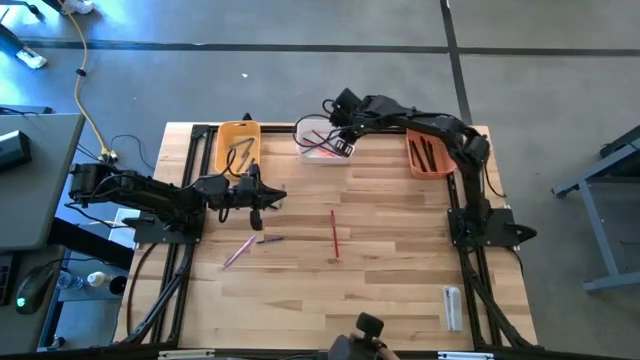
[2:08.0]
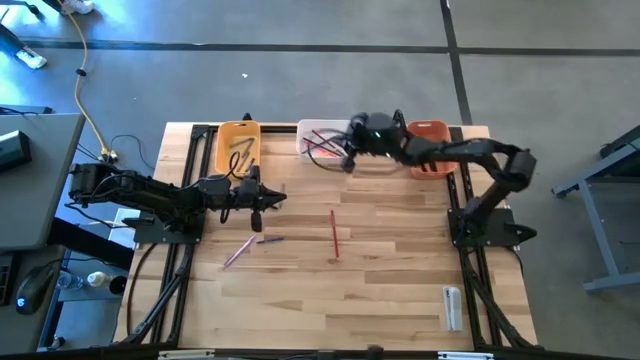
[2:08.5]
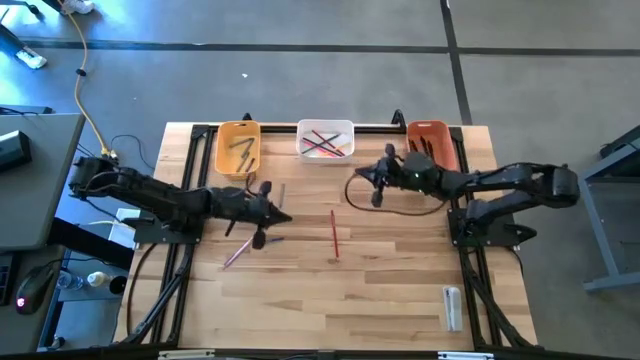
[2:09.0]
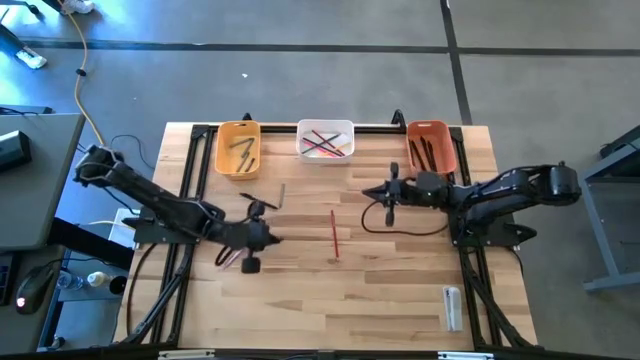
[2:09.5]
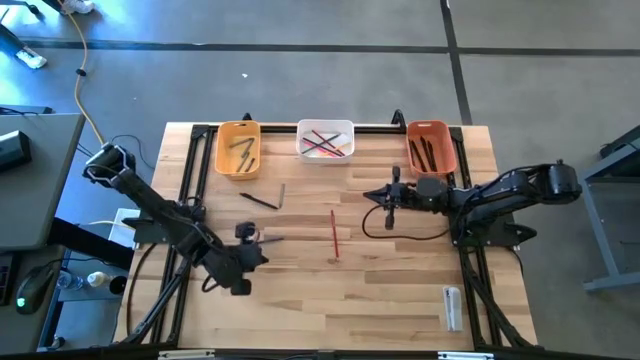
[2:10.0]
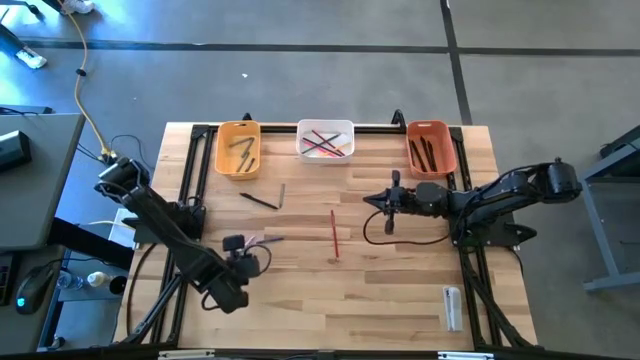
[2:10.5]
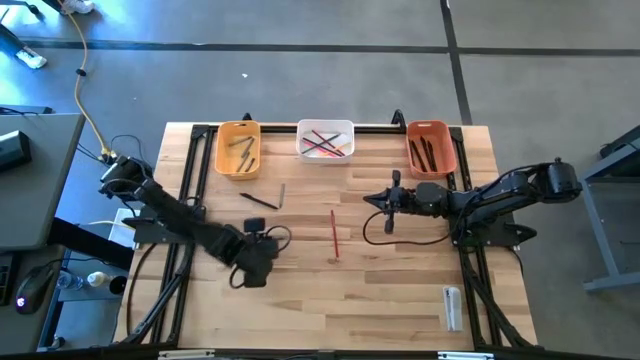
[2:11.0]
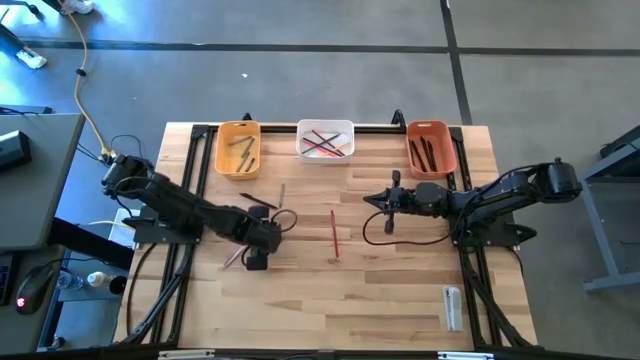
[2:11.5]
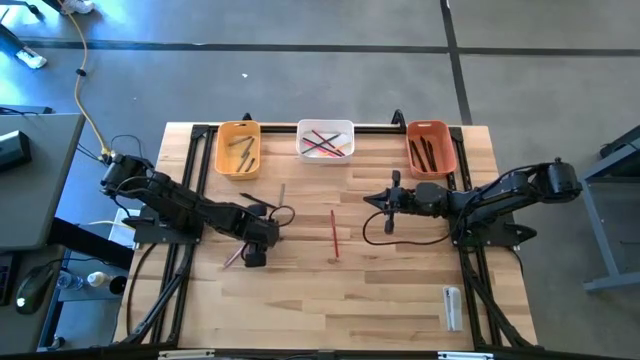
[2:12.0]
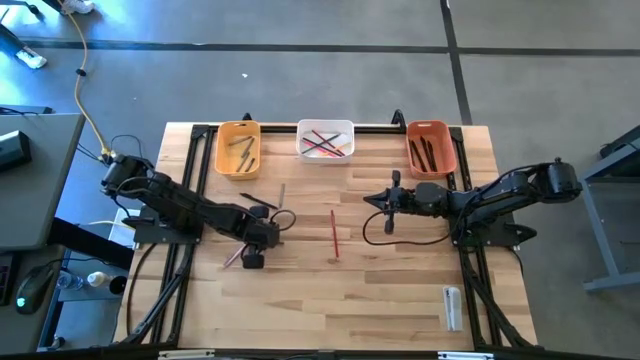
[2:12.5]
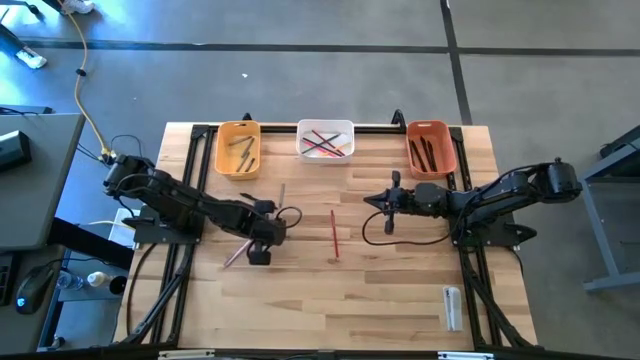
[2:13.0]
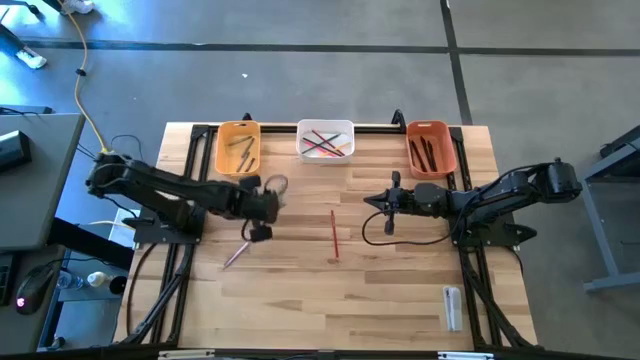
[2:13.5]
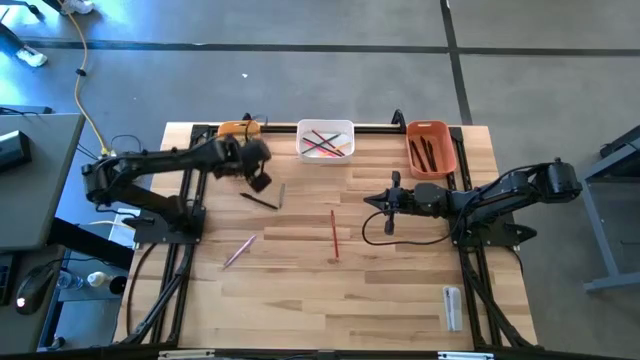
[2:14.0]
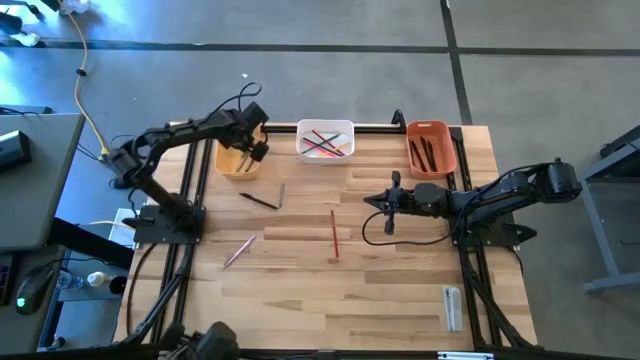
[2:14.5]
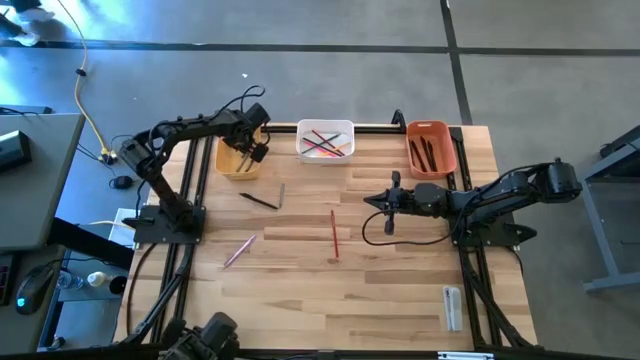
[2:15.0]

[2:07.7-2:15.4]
Task: Sort crayons/erasers/pens/pencils in bins
Put the blue crayon into the yellow bin

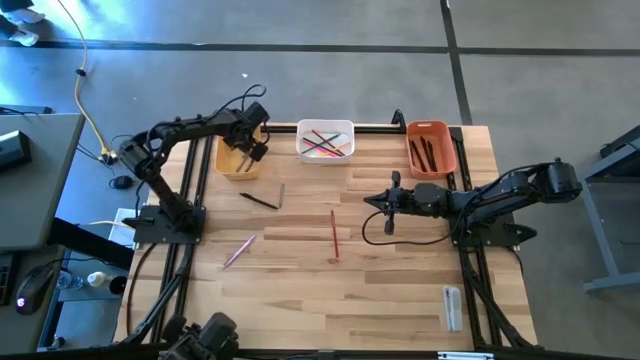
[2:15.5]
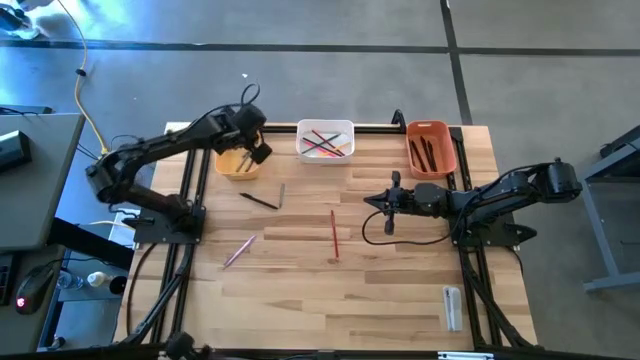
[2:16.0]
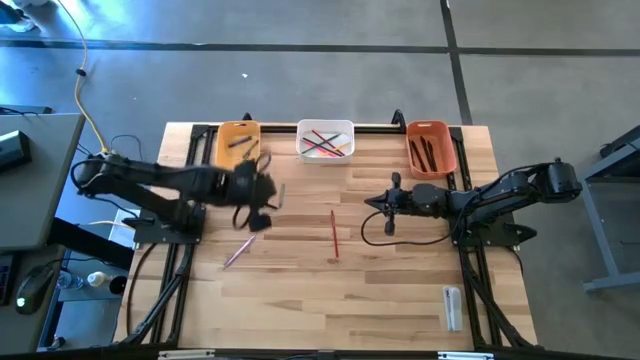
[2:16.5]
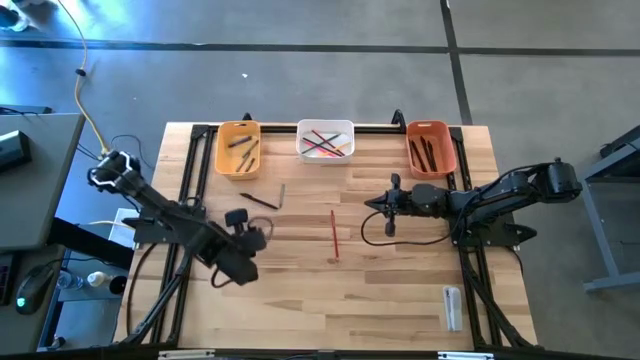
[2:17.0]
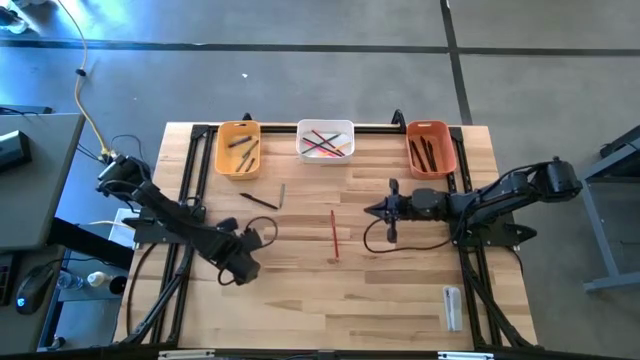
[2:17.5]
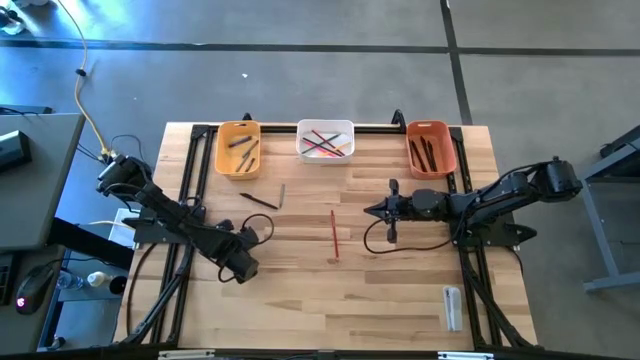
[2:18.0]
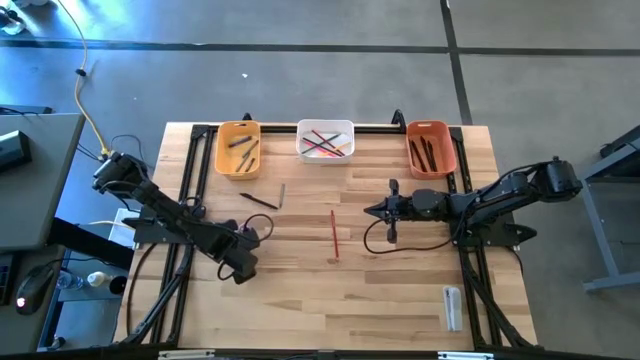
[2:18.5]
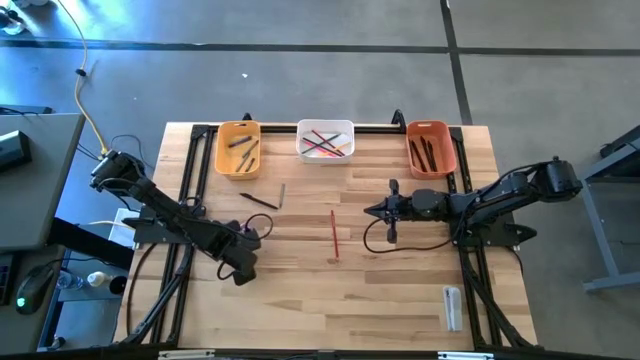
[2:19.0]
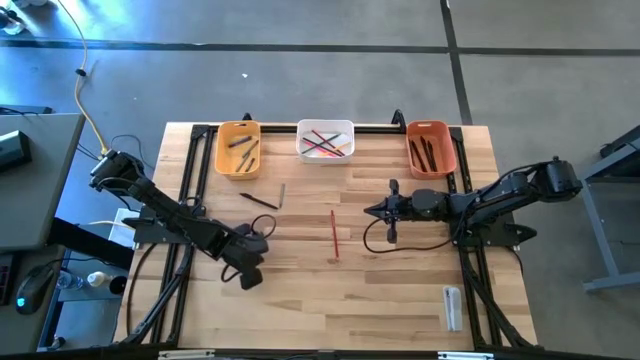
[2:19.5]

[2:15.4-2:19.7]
Put the purple pen into the orange bin

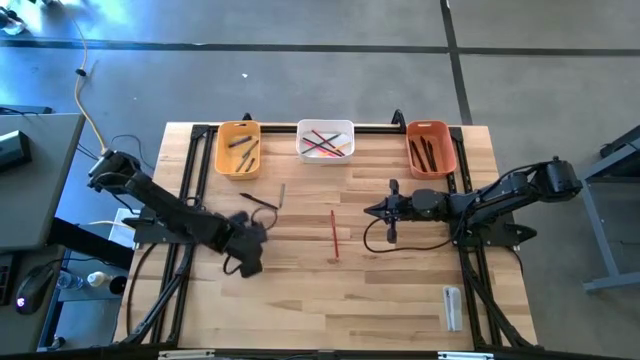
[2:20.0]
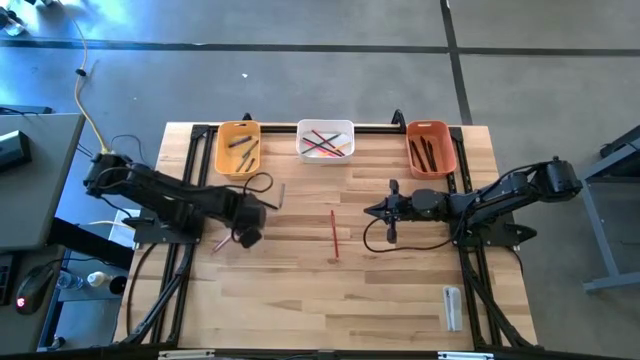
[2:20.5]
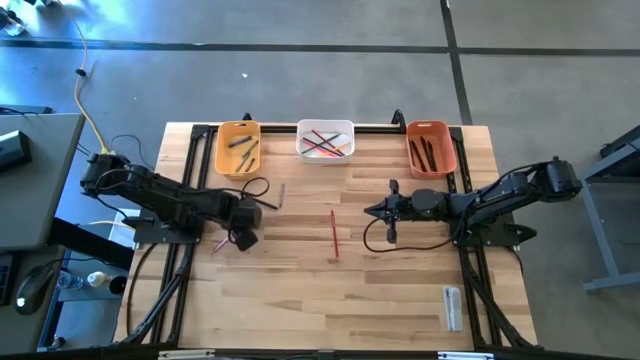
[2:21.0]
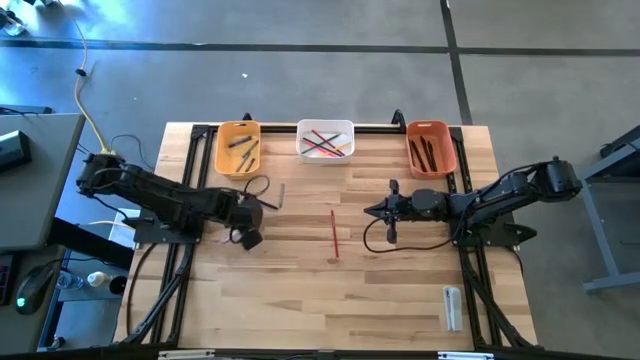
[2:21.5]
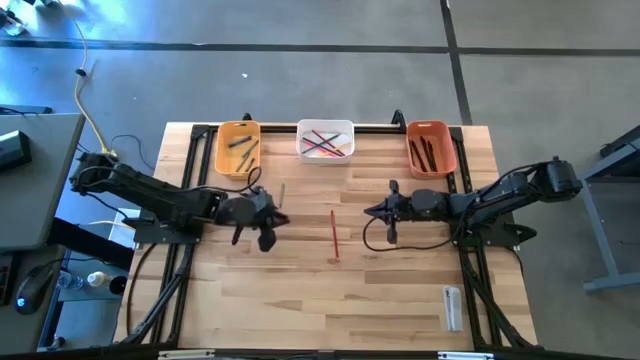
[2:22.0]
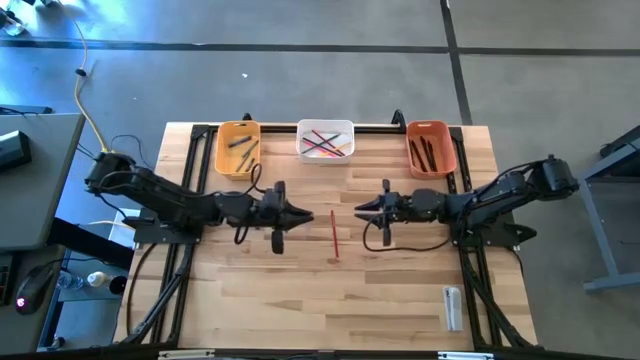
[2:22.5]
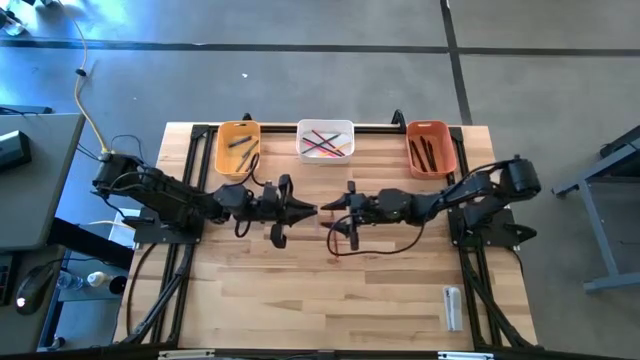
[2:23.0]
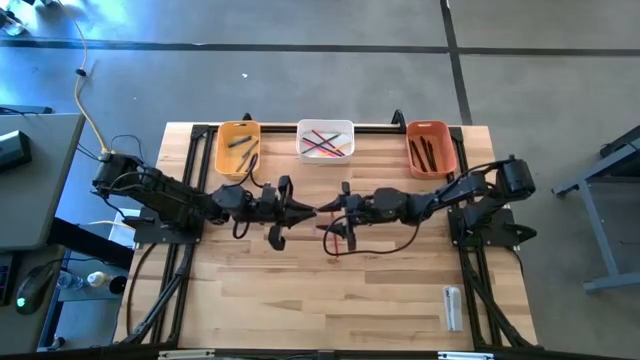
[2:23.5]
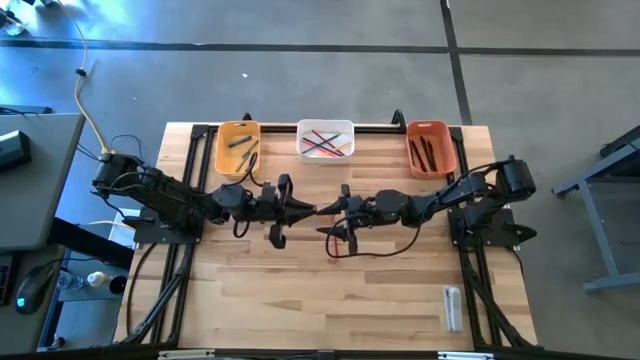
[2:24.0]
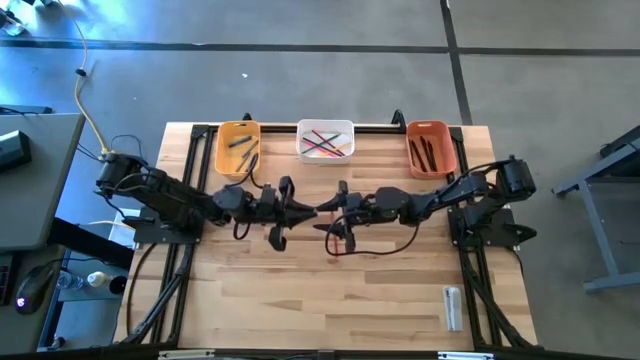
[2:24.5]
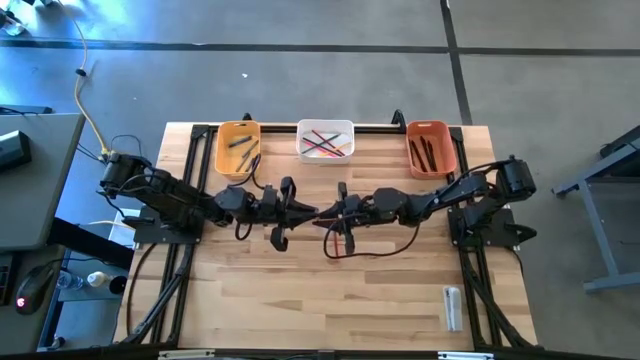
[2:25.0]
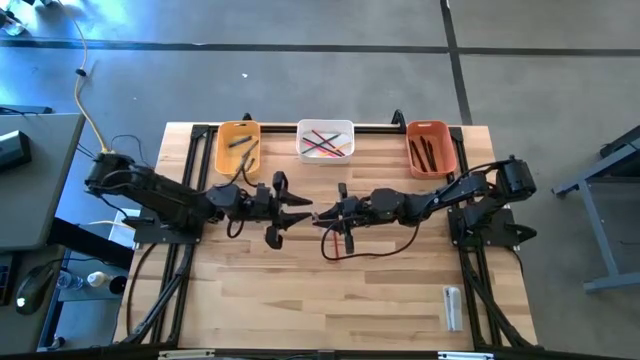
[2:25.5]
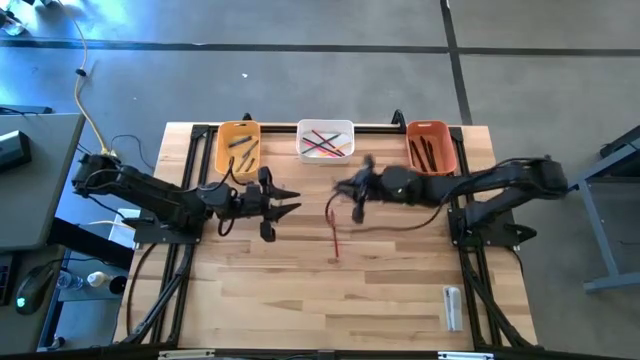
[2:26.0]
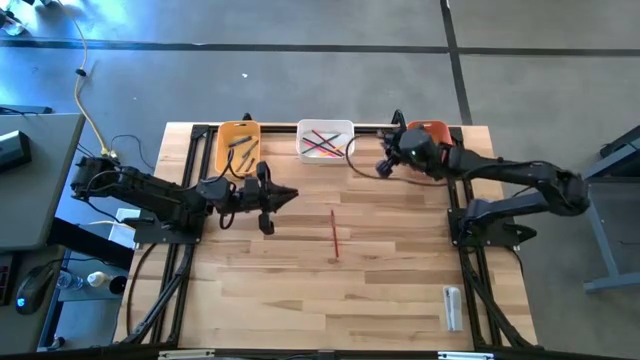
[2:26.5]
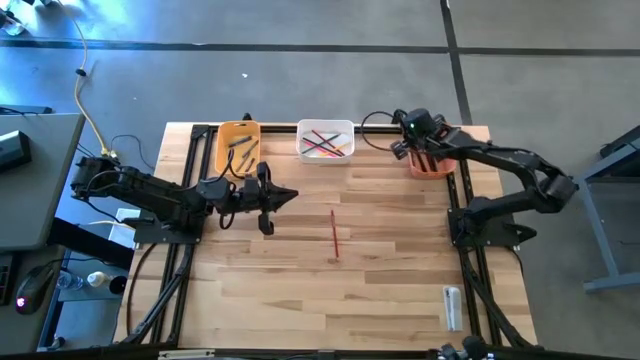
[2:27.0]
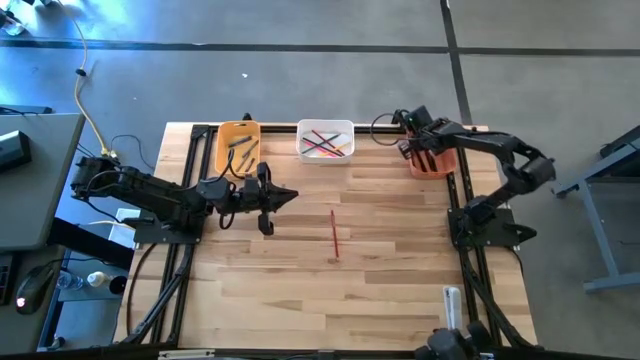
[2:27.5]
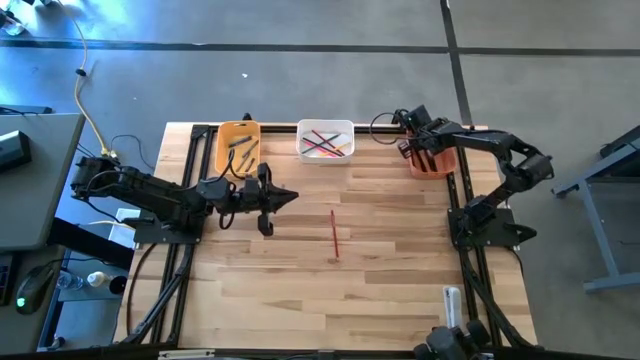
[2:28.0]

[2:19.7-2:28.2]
Put the purple pen into the orange bin
